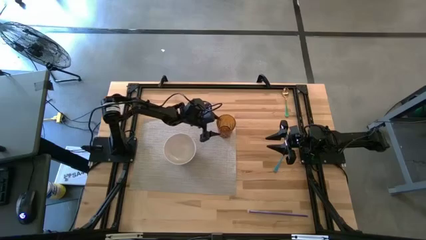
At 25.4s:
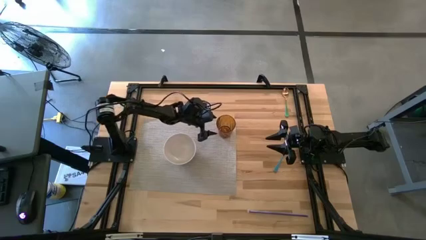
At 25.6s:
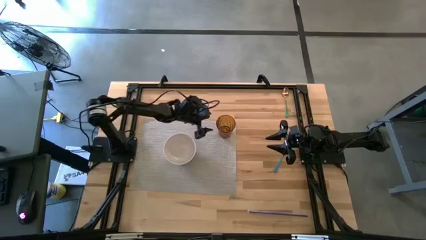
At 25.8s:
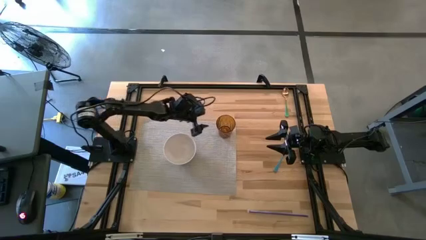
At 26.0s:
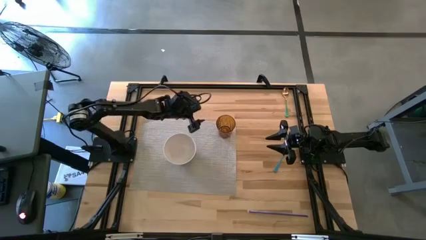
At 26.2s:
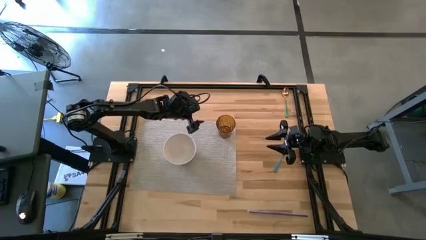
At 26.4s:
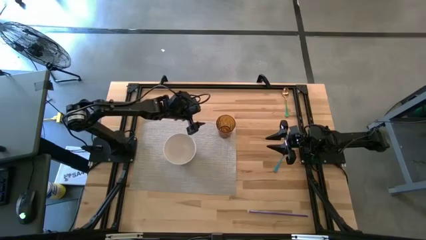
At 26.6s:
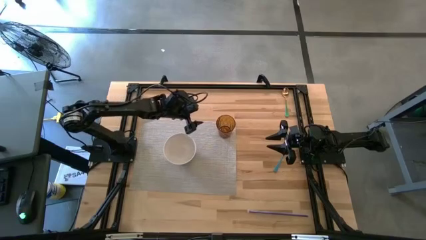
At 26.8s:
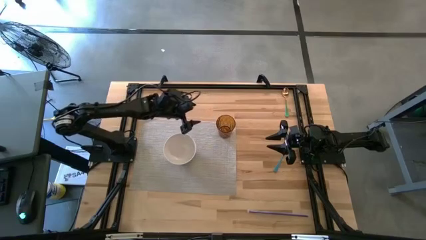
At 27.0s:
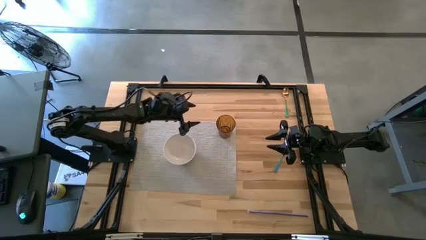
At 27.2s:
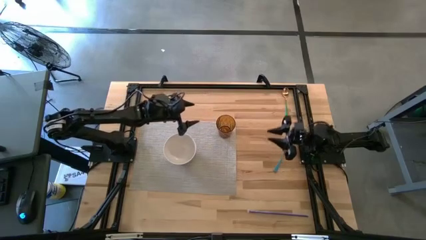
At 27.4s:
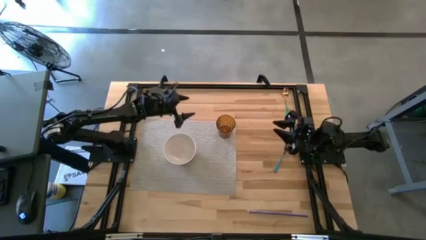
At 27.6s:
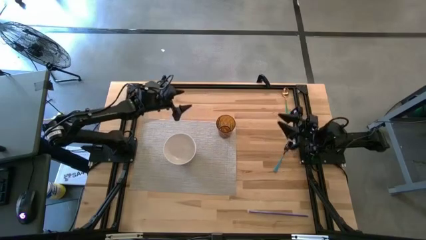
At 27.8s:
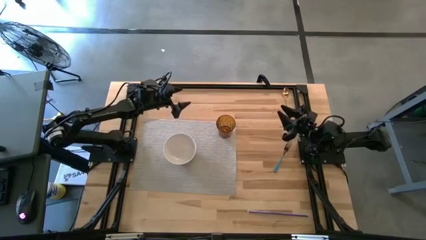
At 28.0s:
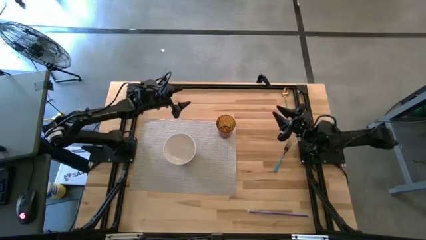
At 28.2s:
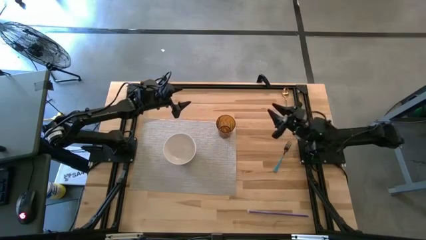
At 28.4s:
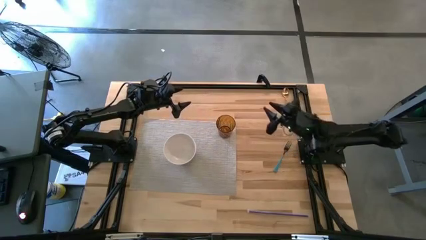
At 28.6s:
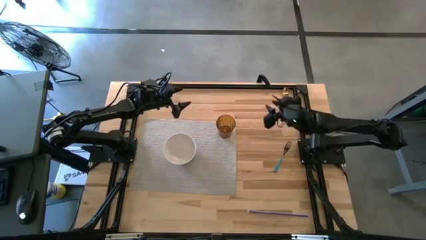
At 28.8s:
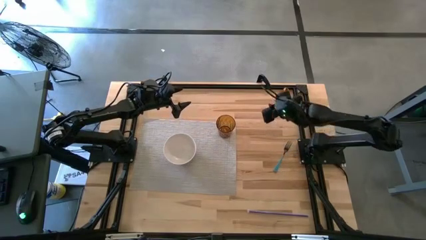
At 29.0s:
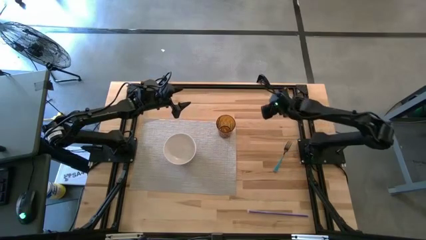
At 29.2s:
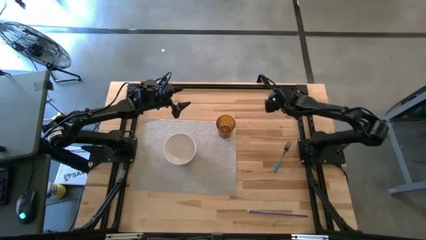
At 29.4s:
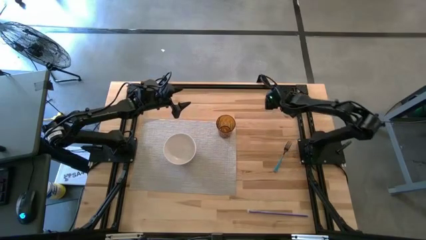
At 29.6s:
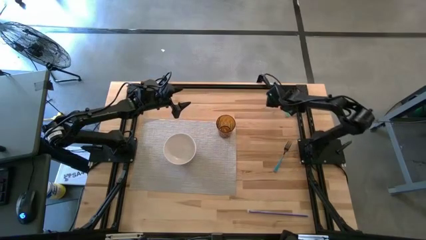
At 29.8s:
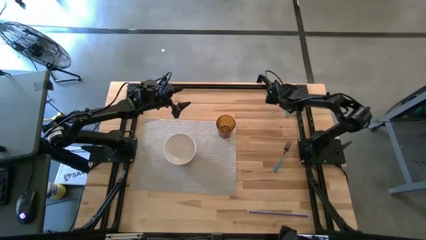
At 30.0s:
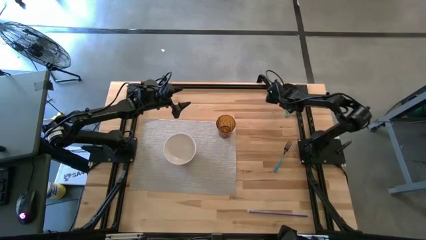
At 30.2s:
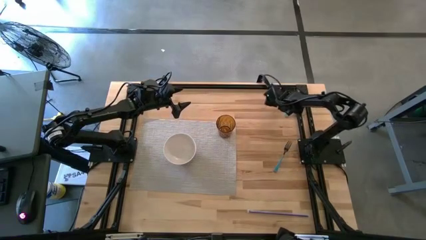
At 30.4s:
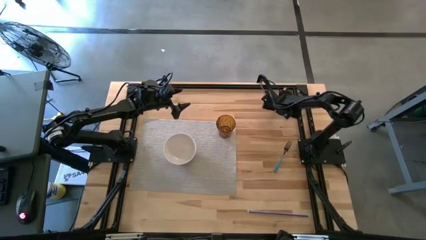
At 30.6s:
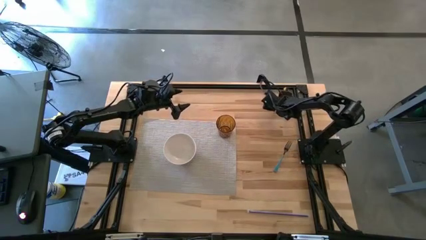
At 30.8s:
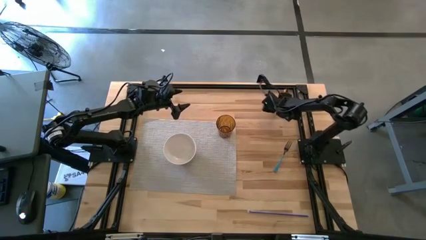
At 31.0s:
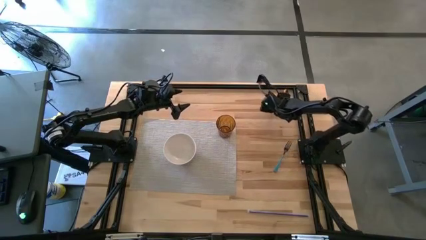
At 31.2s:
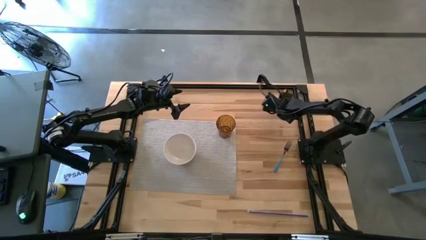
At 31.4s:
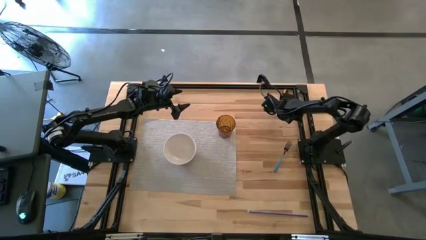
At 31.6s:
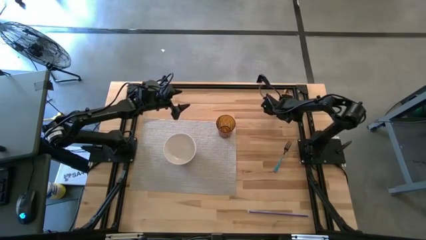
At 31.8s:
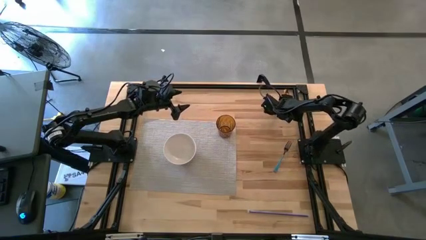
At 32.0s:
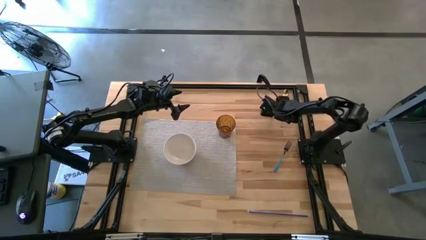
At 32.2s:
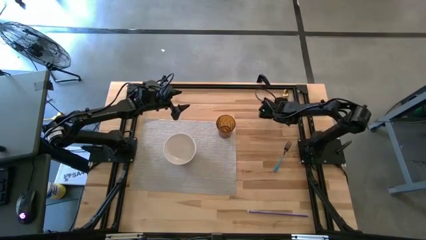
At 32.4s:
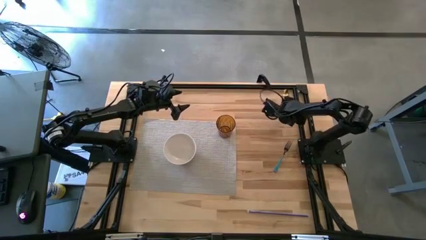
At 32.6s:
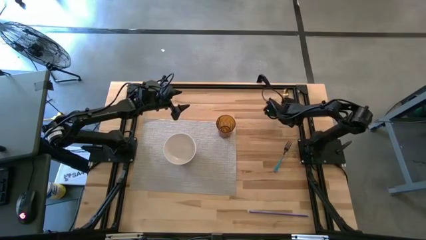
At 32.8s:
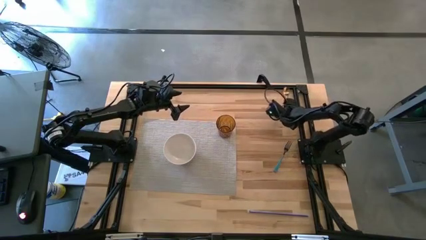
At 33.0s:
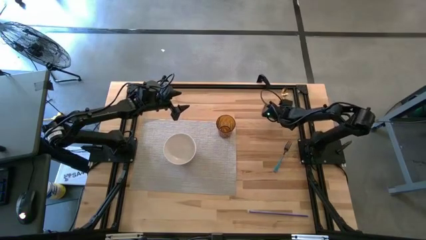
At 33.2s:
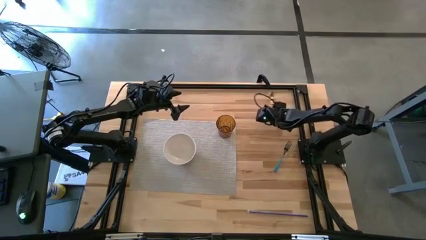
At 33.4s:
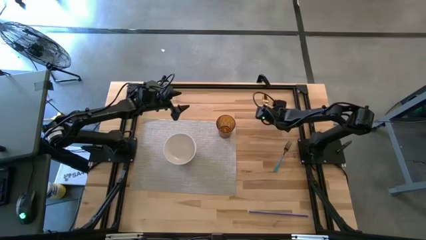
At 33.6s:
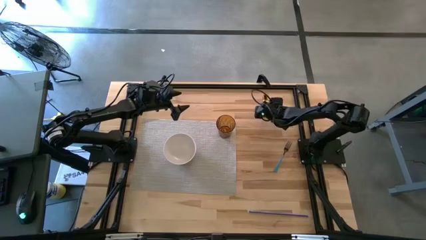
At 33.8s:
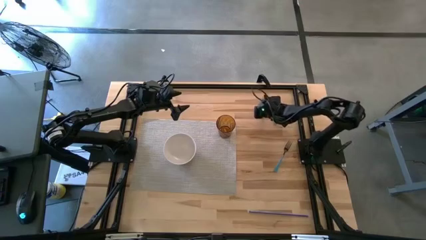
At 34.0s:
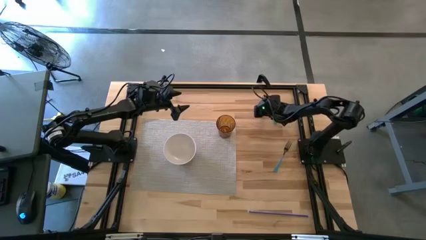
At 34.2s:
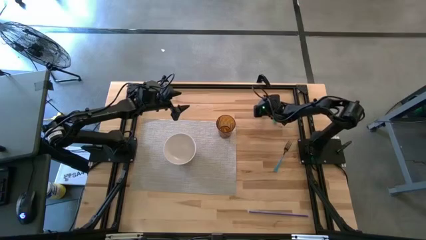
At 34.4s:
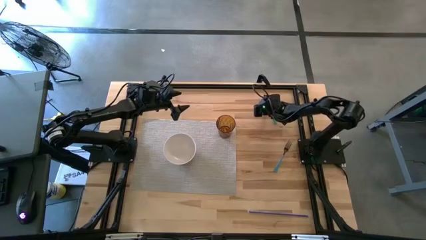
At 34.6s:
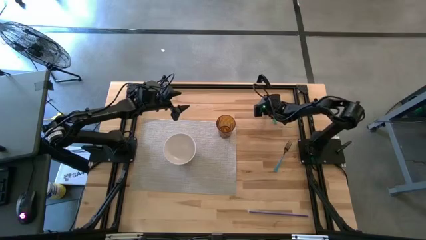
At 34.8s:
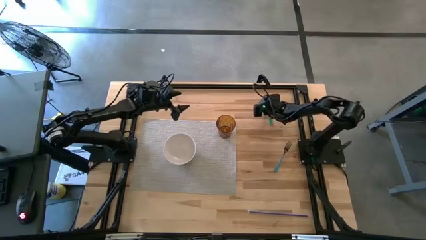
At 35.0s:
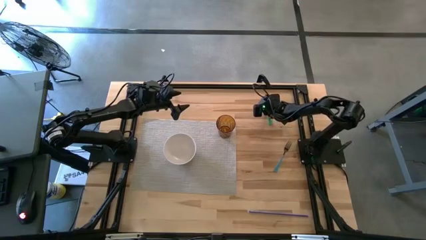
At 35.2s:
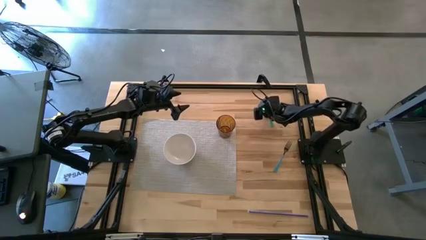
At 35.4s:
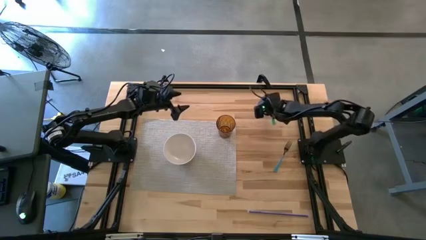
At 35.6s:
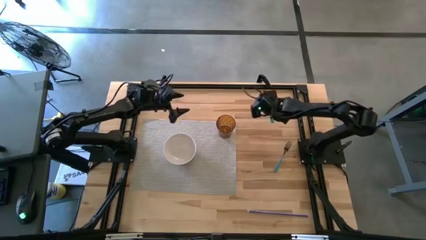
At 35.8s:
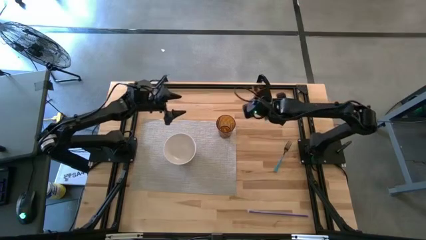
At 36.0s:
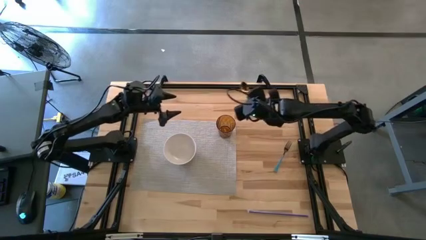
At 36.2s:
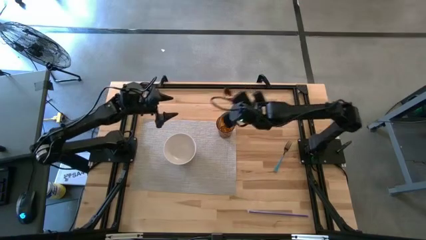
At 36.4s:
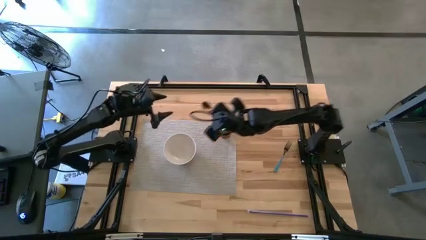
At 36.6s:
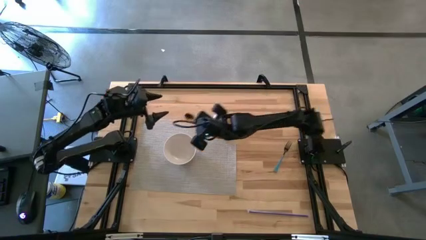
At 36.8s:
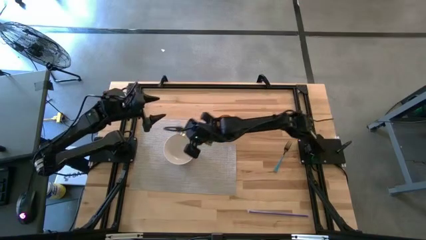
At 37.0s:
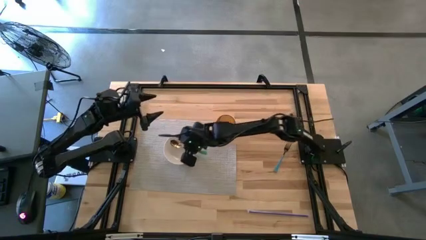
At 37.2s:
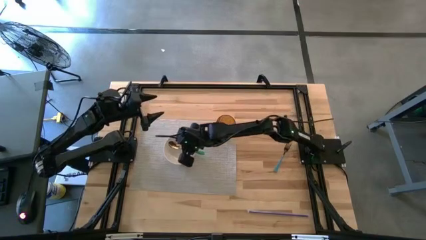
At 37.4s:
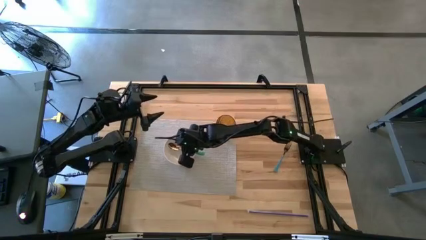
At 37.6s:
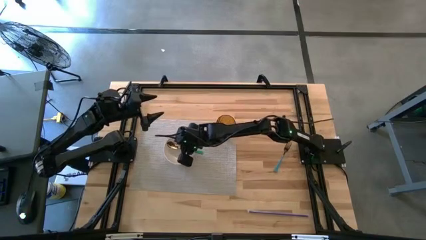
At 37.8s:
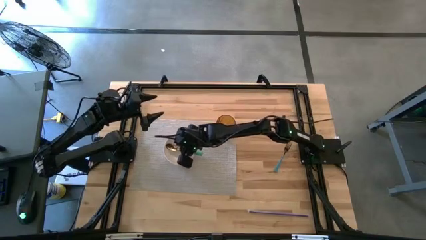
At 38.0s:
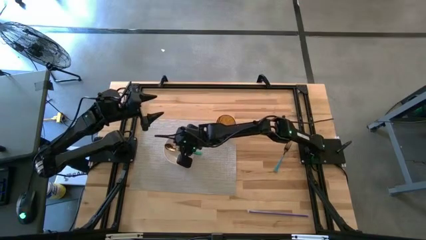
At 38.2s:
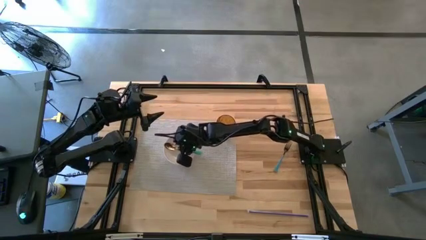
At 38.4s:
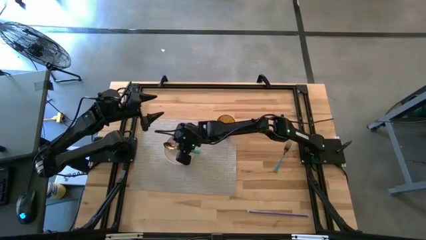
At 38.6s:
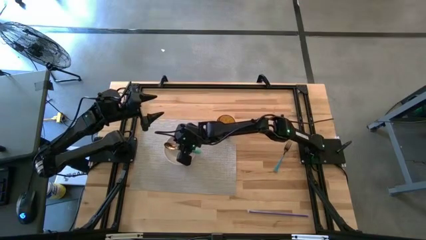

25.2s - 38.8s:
Task: Pick & Place Utensil
Put the green spoon into the white bowl on the gray mat

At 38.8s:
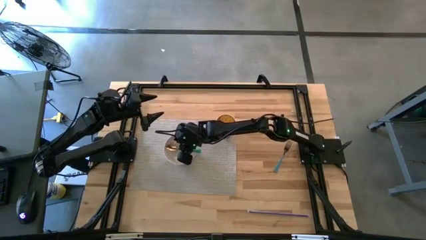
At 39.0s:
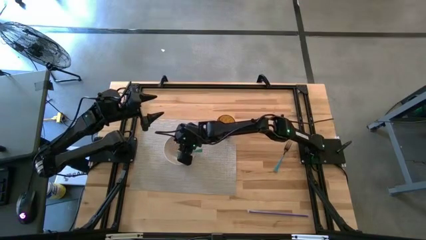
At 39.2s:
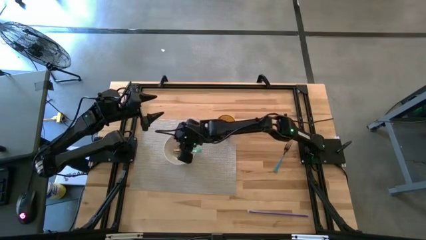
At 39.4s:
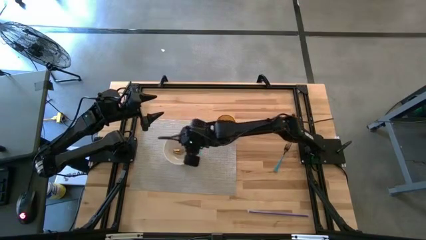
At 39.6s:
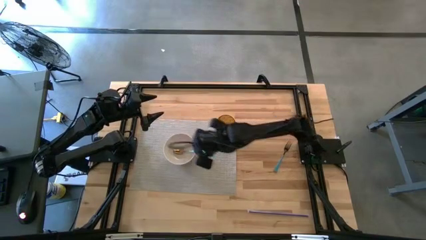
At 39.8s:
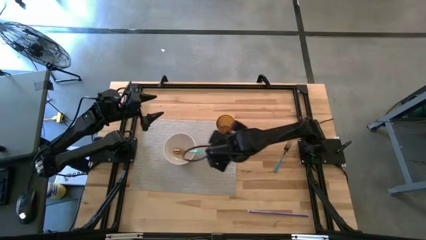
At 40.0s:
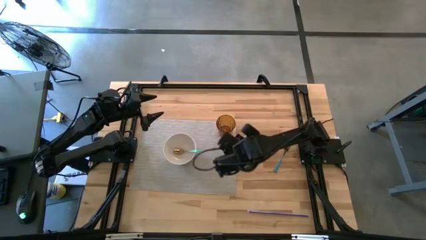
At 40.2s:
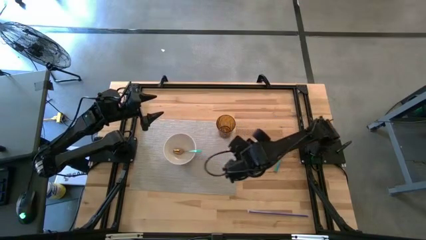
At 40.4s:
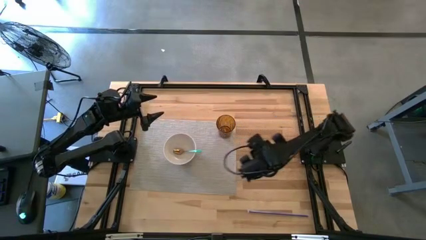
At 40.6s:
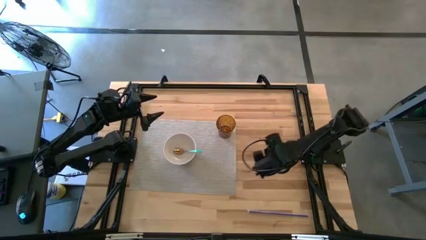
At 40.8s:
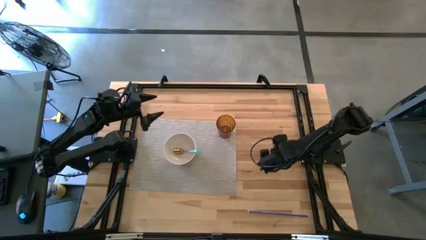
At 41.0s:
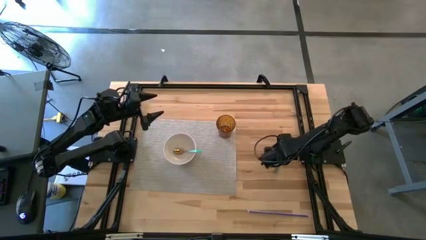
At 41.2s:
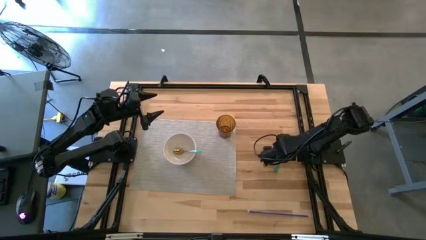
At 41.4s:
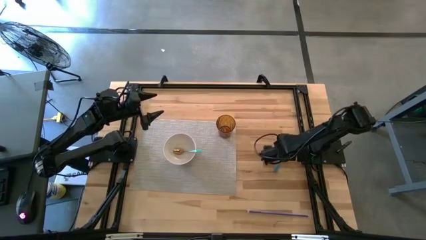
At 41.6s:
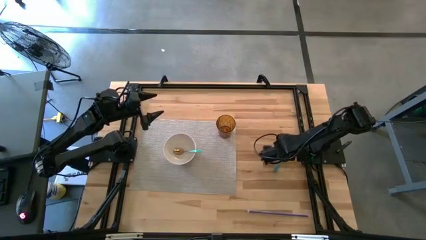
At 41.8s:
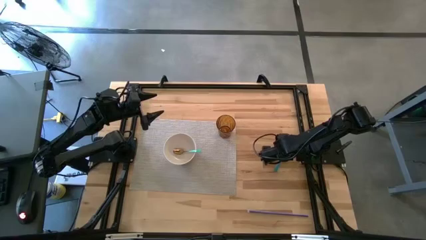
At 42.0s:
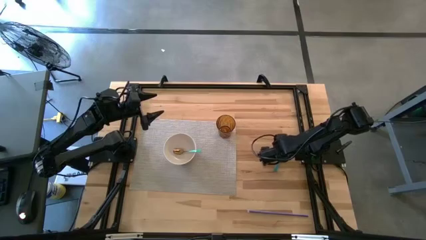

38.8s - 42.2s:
Put the blue fork into the white bowl on the gray mat
